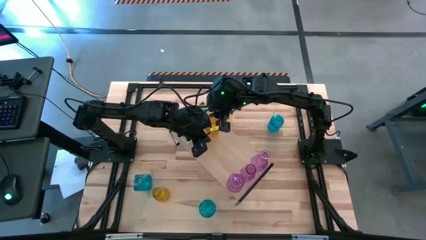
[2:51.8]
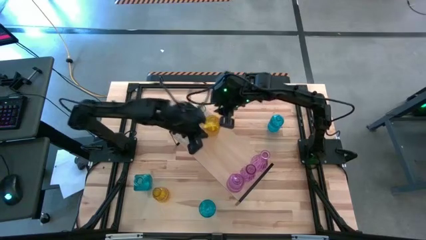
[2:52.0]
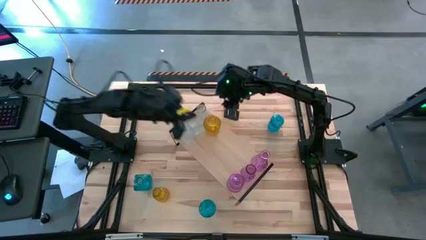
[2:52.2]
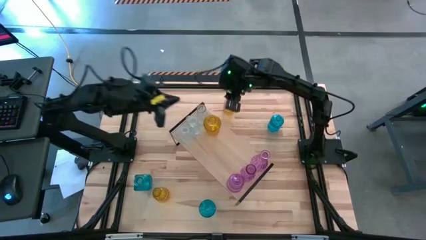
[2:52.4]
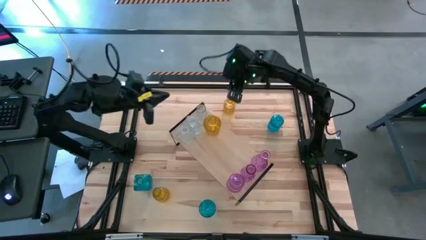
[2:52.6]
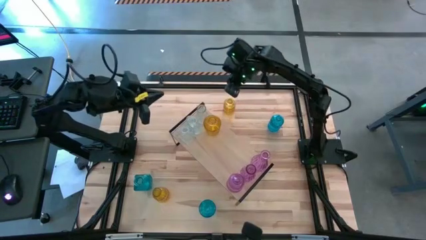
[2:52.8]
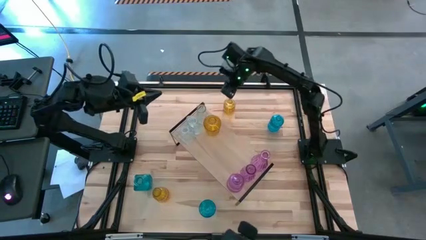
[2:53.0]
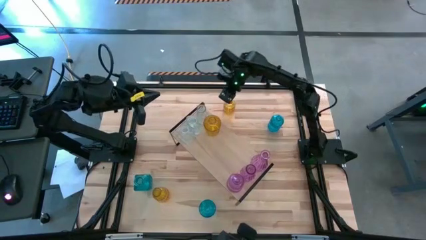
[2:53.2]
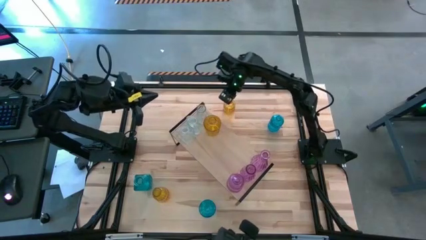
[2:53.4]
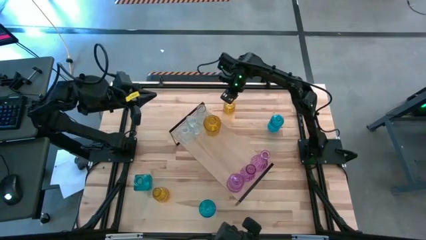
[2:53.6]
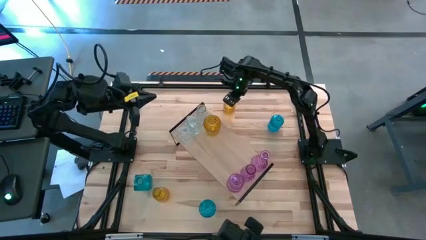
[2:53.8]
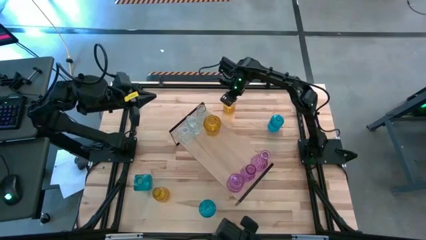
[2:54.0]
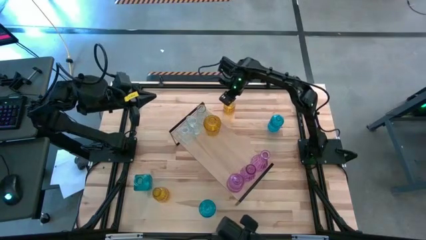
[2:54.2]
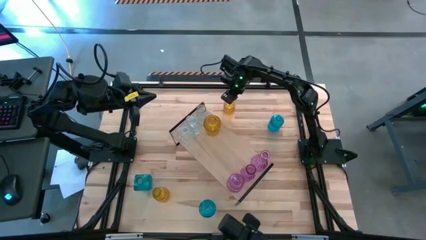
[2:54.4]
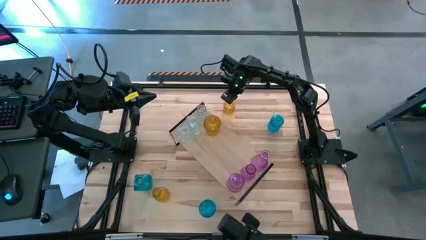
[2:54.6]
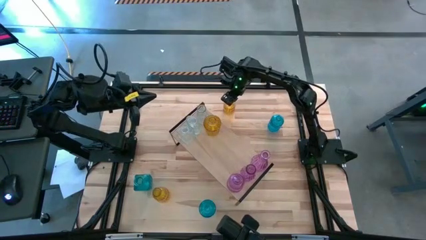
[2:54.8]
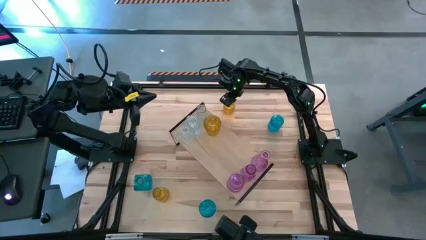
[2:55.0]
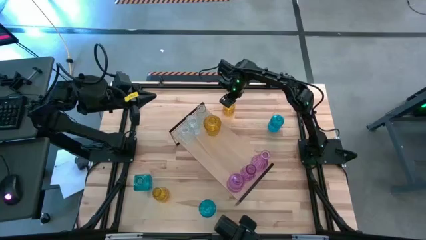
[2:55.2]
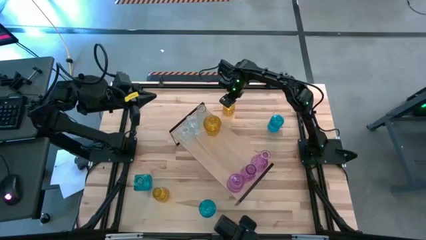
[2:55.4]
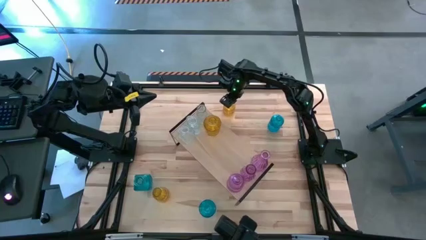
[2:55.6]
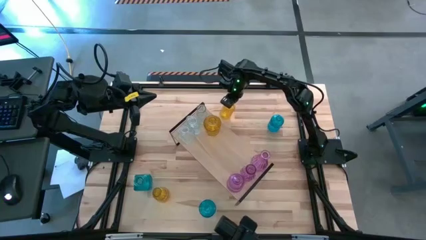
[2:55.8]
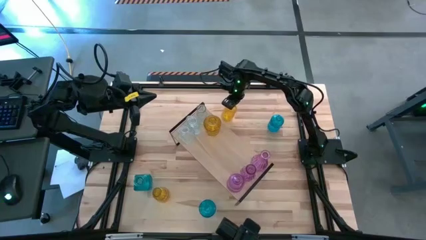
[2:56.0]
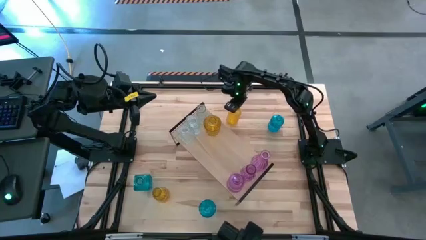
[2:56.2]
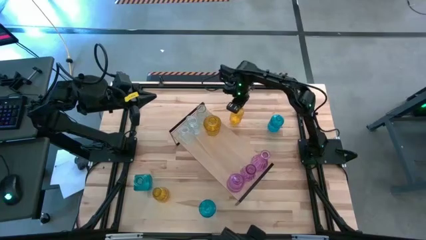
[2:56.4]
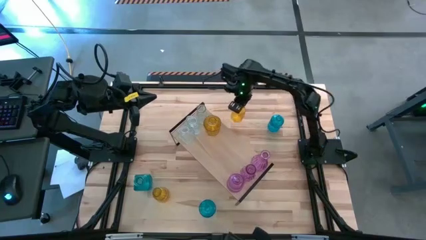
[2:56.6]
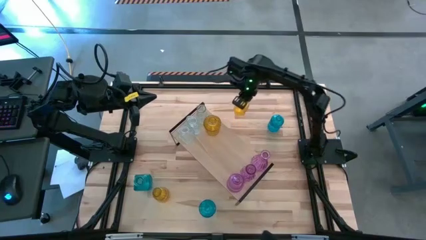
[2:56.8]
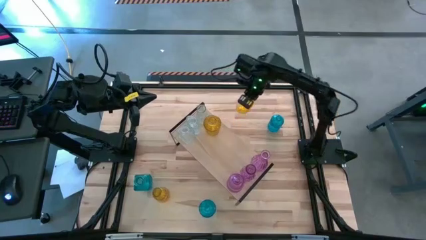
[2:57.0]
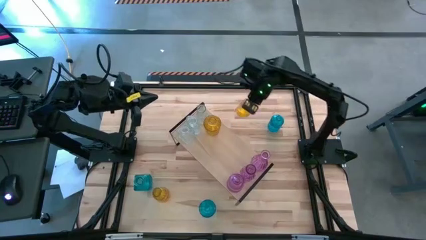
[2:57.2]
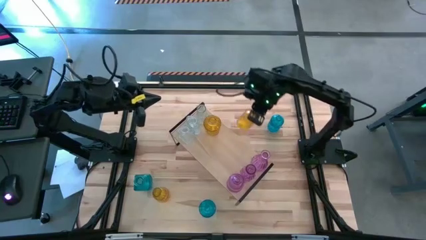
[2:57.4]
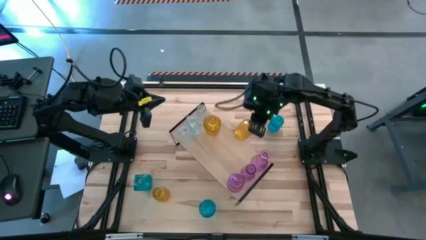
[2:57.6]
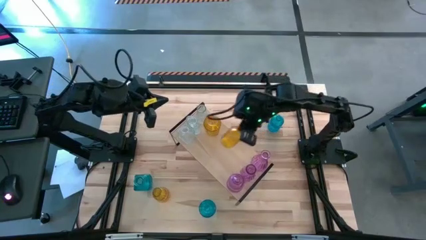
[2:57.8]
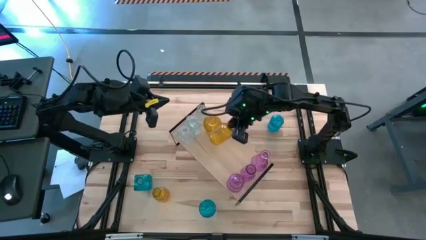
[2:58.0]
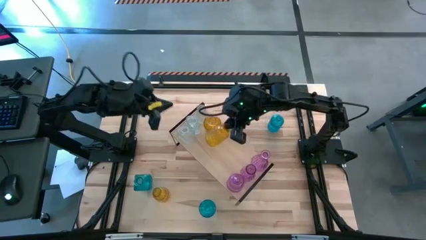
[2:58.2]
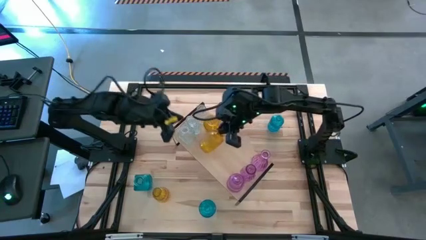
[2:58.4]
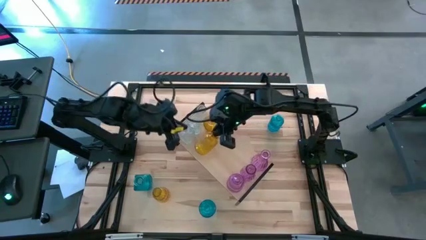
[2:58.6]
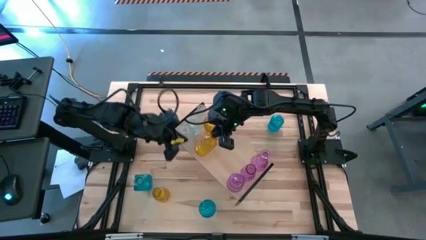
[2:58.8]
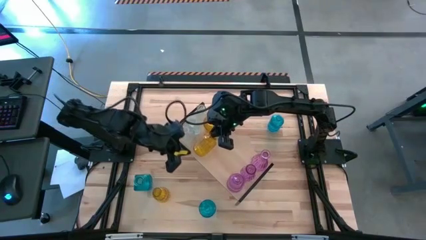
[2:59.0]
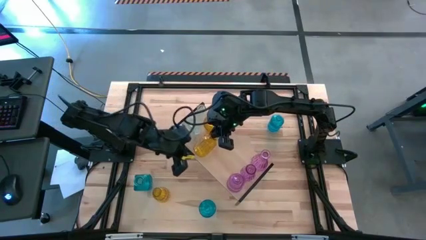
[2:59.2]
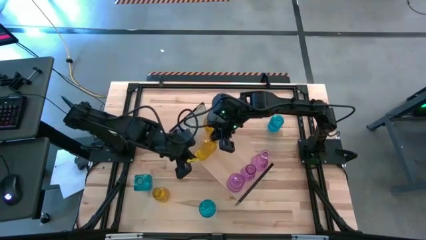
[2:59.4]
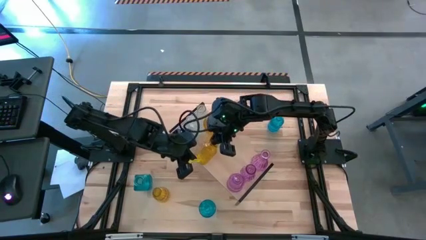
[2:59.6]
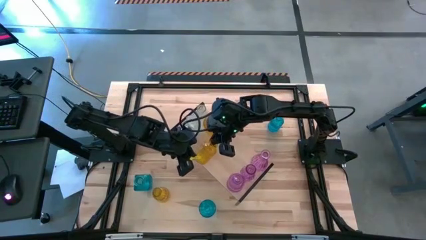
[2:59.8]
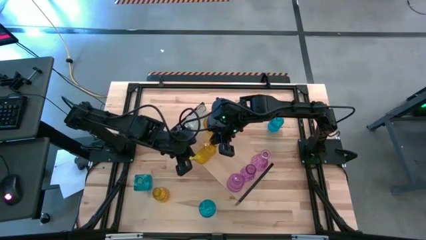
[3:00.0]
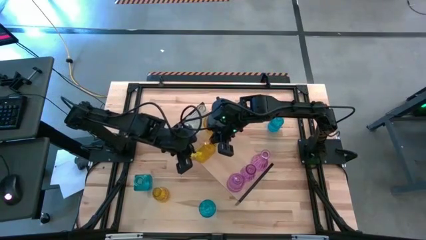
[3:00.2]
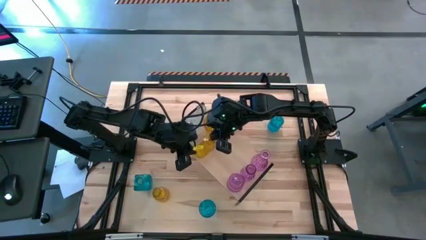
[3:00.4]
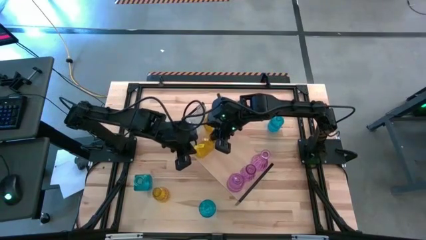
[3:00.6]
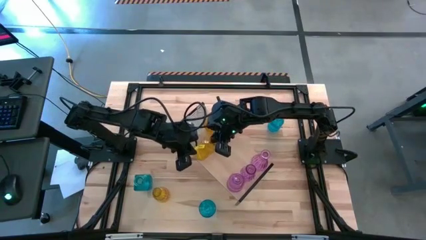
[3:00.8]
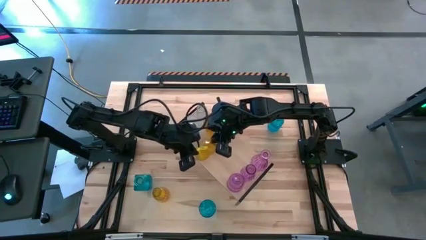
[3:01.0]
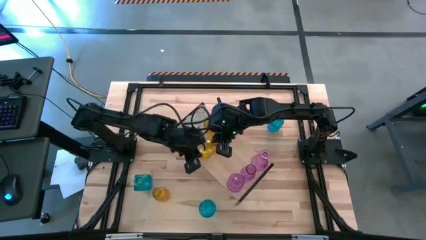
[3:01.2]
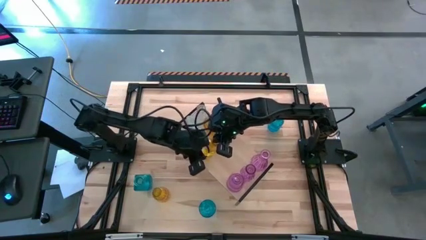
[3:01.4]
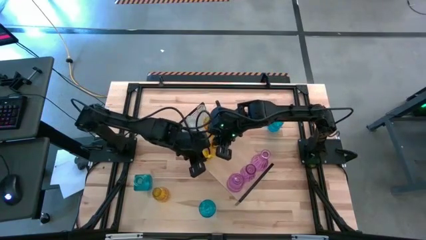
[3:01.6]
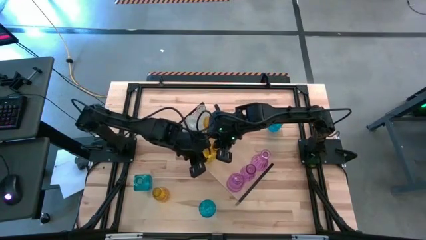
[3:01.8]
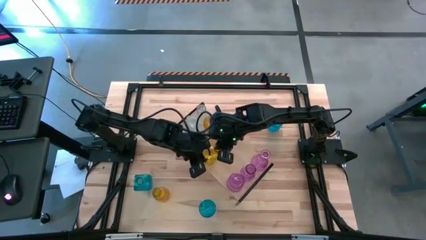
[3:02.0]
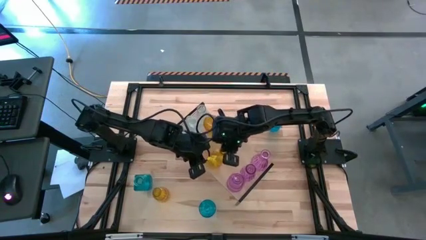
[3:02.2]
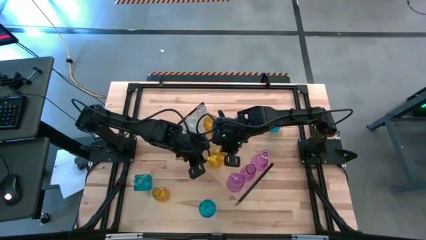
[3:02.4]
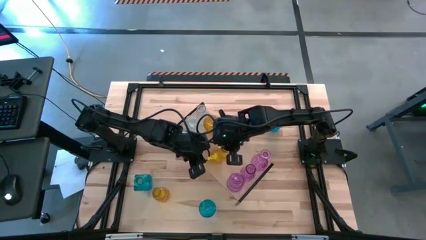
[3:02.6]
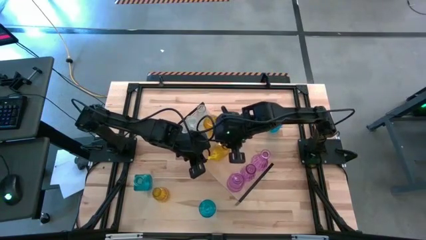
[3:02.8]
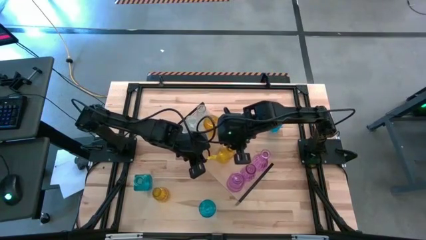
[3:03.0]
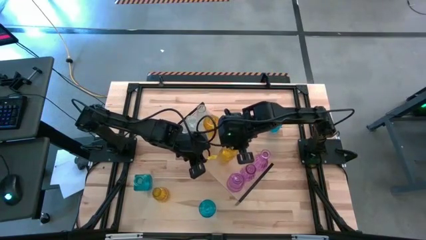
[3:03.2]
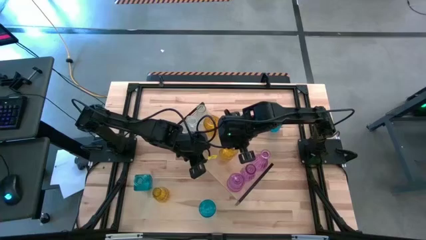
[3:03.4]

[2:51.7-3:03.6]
Task: sort vases onto shelf
Put the top yellow flower vase on the shelf aligned with the other yellow flower vase

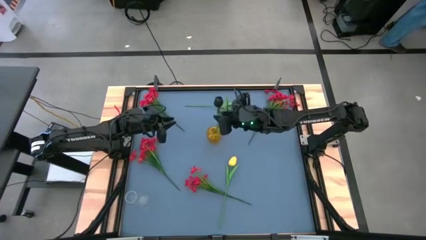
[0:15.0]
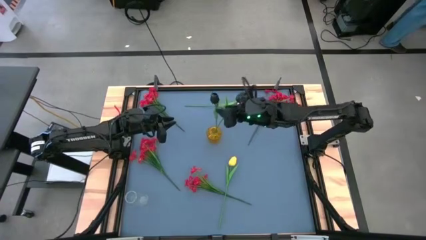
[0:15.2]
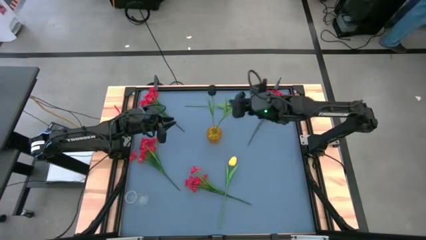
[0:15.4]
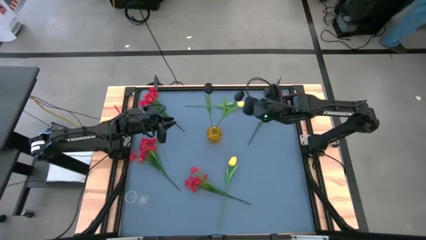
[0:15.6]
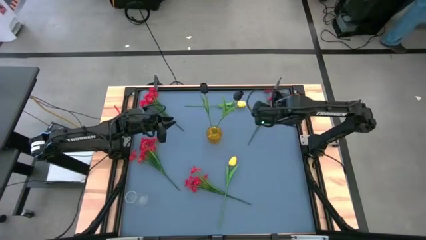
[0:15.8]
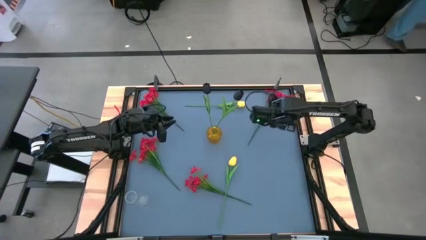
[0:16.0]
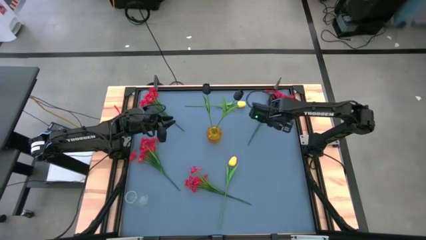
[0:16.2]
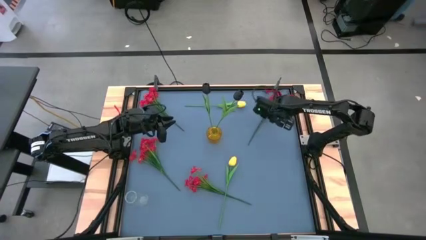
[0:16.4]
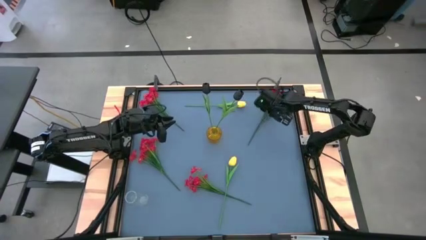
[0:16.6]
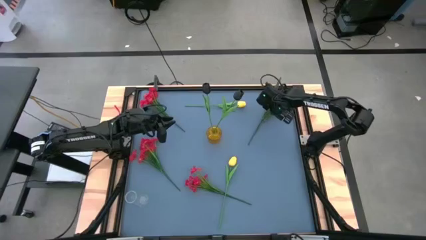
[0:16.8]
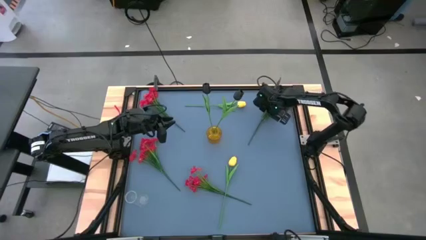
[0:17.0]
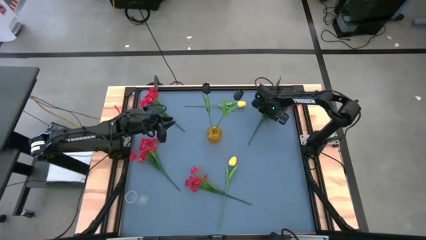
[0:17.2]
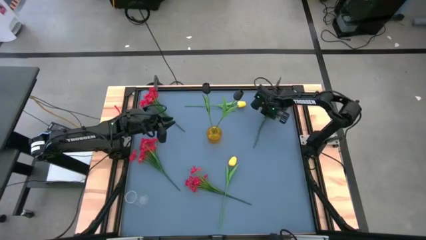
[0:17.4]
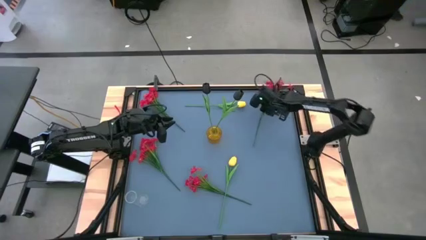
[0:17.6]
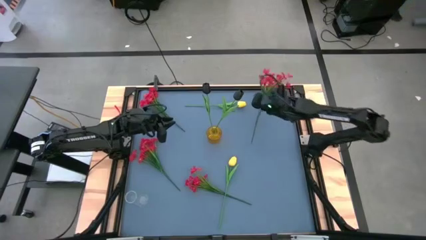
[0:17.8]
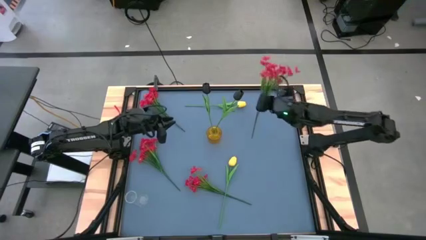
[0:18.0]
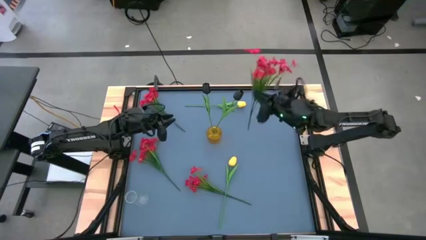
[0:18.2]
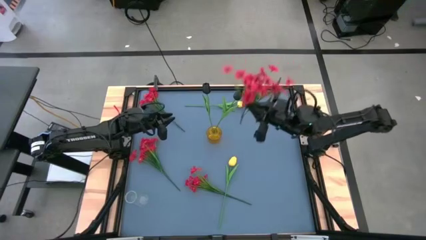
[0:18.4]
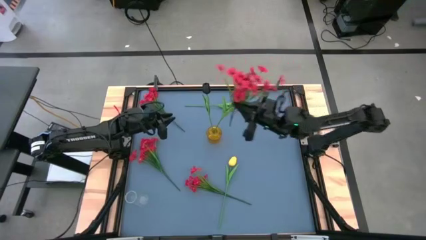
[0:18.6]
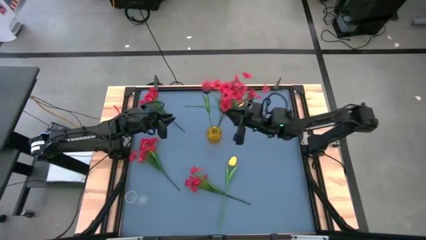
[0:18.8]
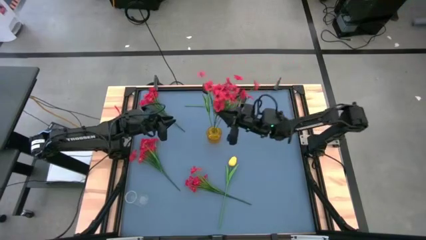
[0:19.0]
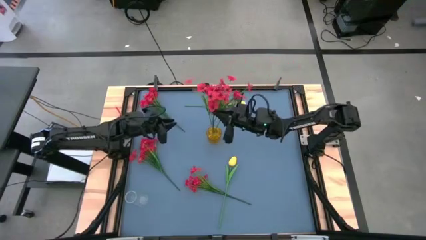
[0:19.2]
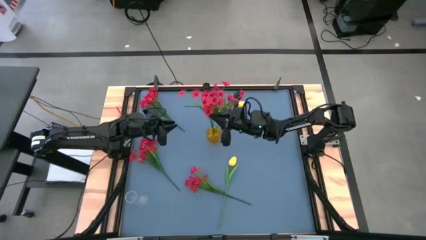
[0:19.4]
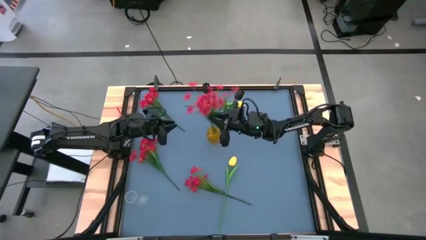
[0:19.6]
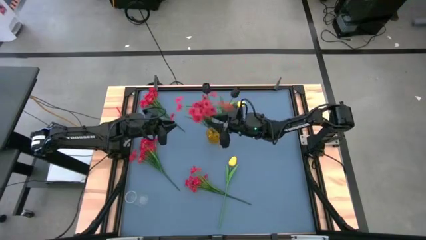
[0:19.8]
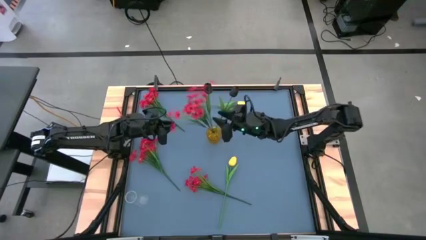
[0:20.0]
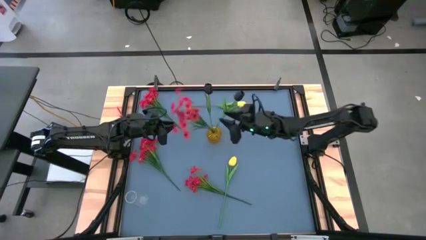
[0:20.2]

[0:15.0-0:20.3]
Task: Sort flowers into vase by color
Put the top right red flowers into the yellow vase
